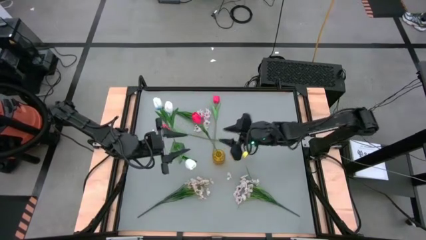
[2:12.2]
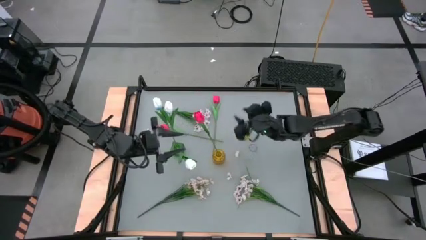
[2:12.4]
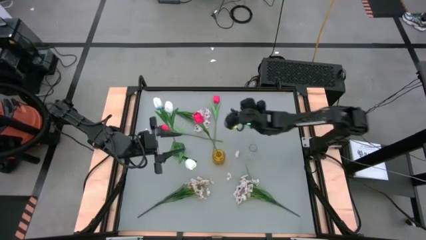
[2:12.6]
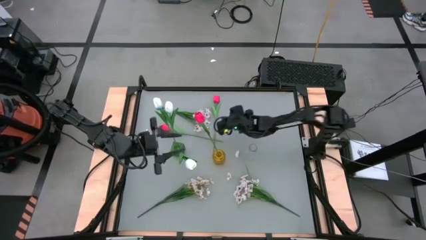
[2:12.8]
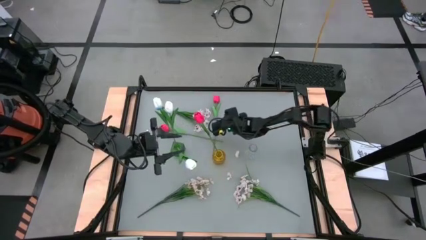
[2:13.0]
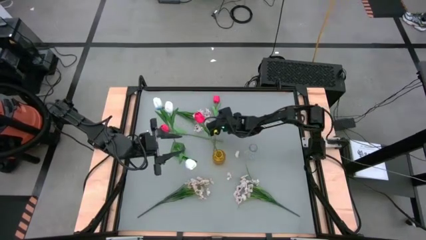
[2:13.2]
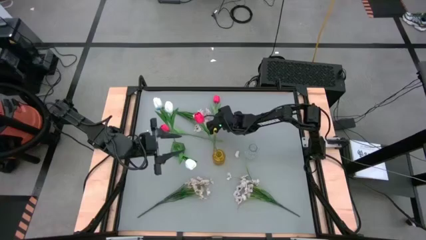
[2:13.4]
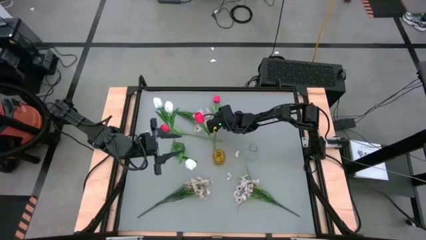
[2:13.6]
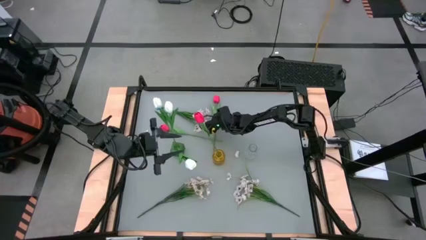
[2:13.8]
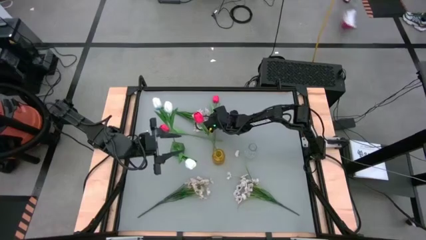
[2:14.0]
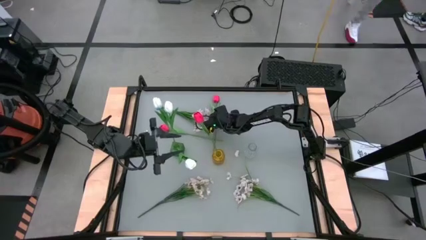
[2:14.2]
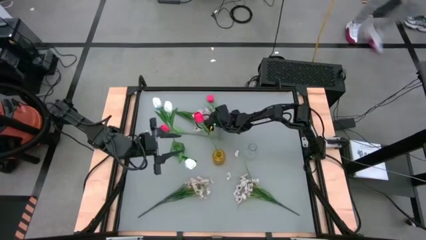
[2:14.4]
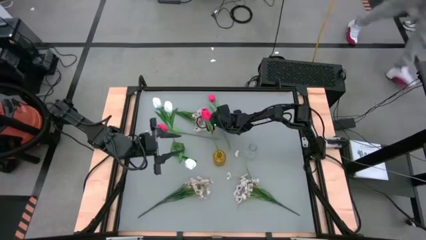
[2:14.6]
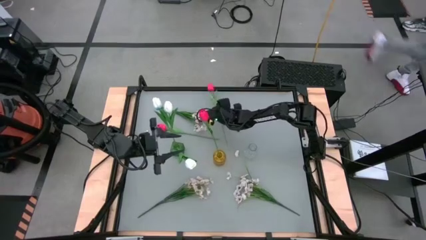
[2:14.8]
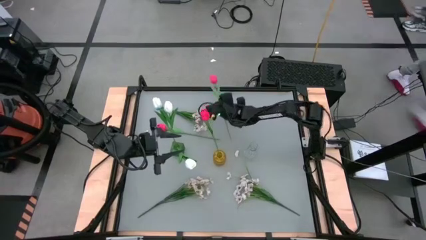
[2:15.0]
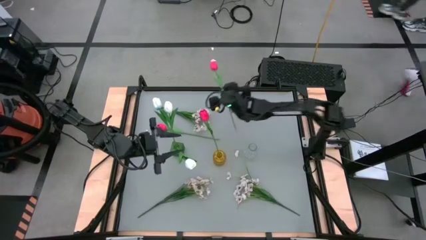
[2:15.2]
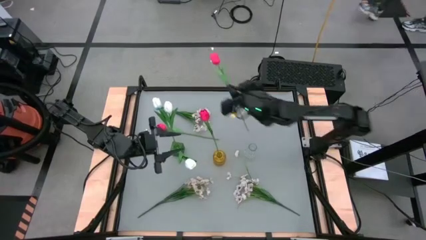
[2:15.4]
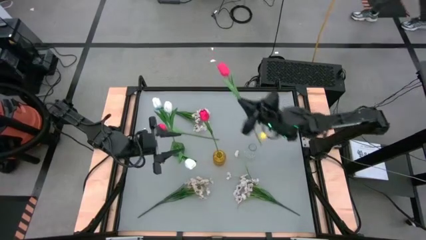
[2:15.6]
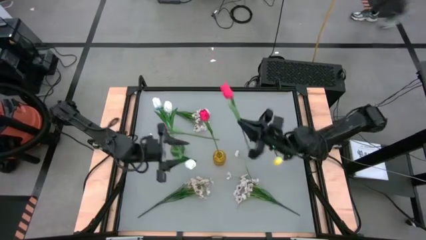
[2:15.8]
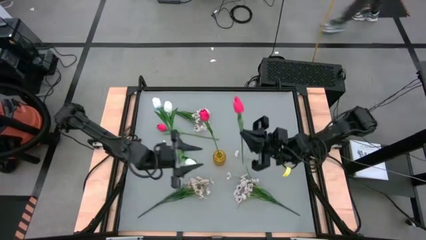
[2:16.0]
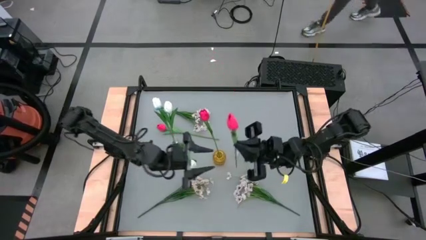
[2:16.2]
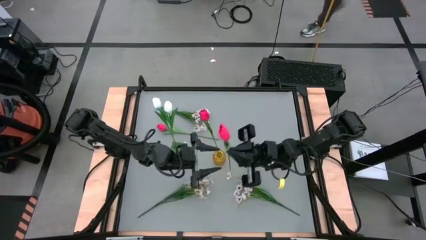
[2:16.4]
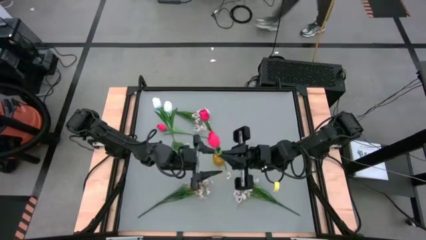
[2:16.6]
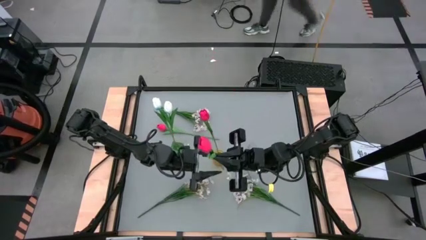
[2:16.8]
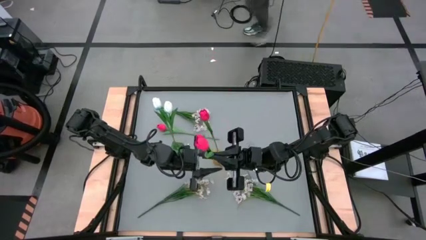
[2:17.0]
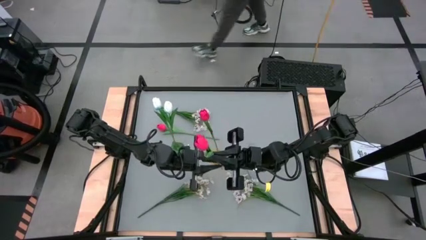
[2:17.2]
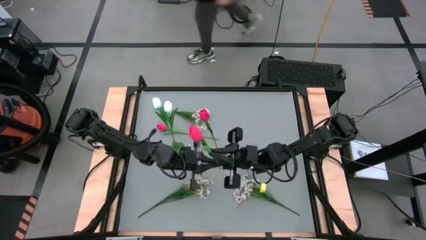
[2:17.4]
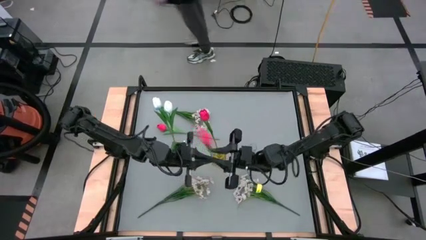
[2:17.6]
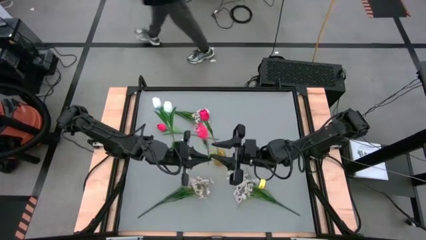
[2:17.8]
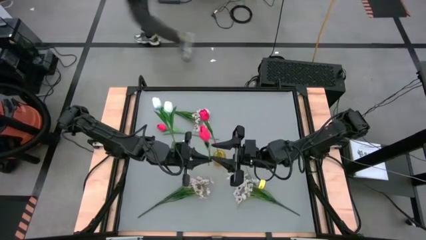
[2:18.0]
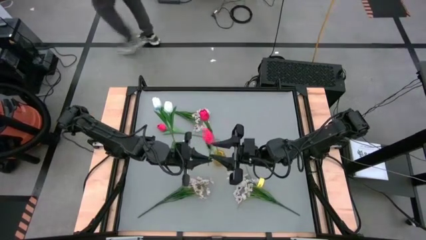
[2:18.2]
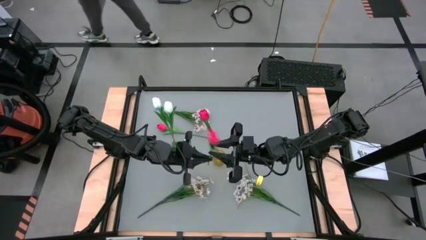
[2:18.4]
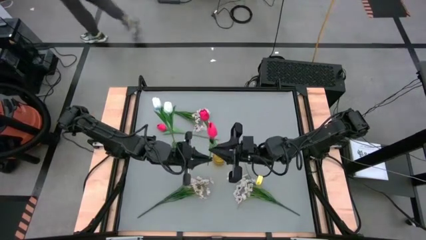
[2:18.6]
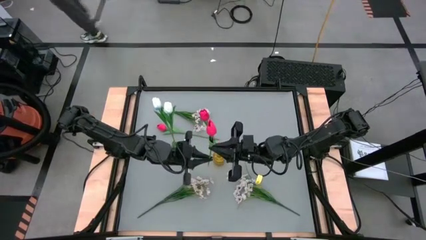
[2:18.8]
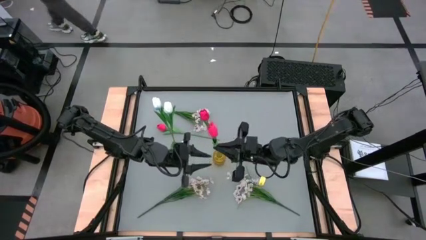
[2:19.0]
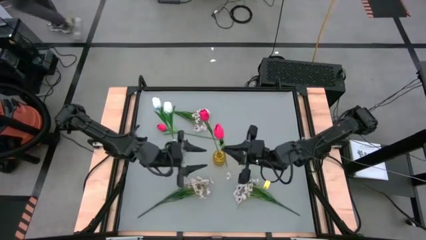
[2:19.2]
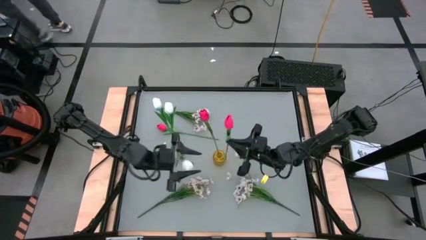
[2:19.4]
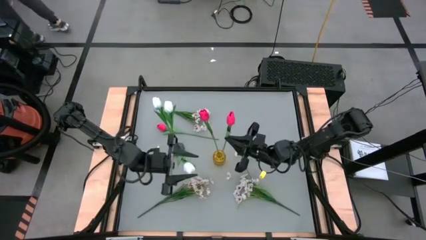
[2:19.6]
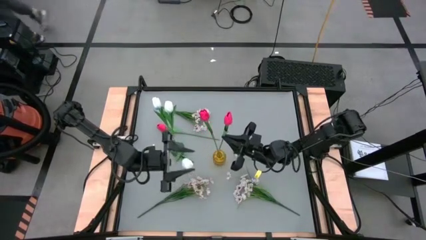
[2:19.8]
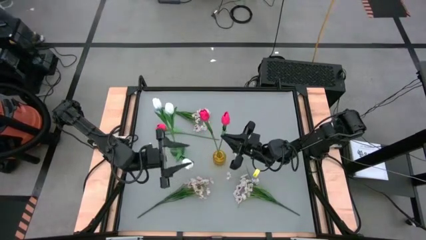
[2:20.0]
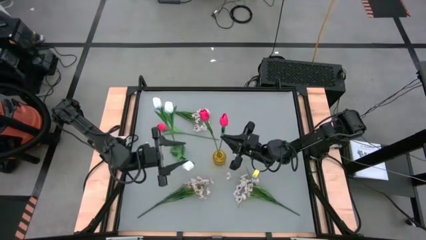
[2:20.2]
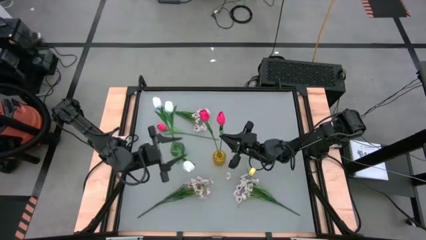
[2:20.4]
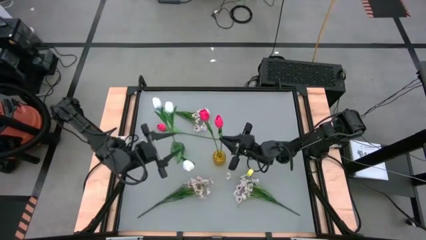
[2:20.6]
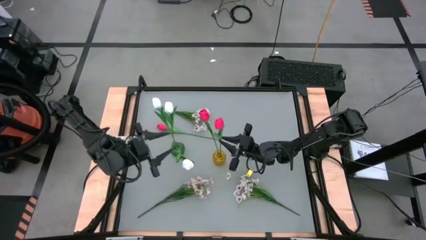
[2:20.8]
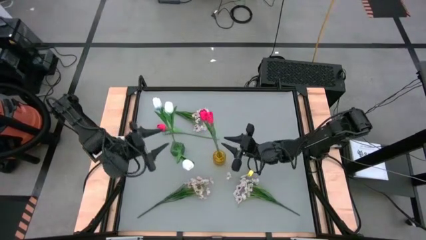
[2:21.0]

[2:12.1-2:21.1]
Task: Sort flowers into vase by color
Put the right pink flower into the yellow flower vase

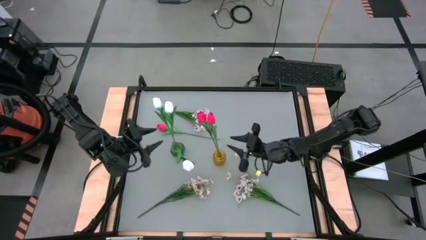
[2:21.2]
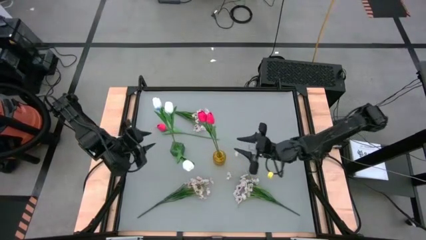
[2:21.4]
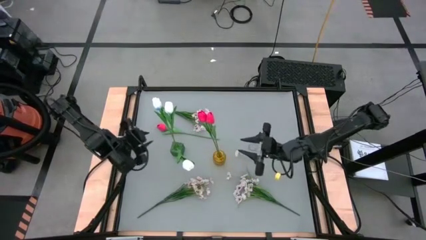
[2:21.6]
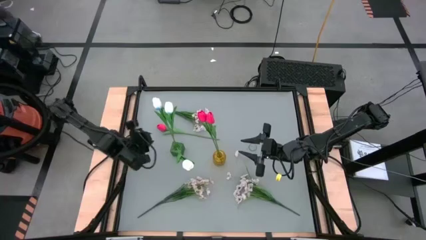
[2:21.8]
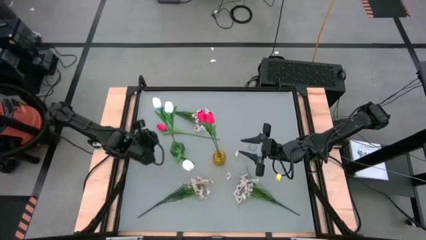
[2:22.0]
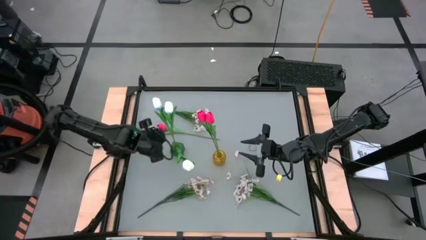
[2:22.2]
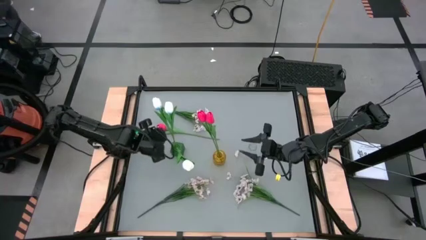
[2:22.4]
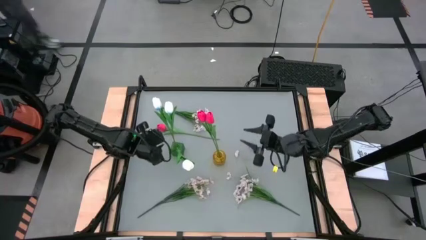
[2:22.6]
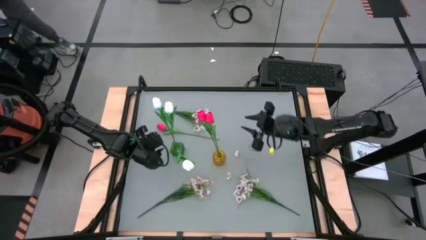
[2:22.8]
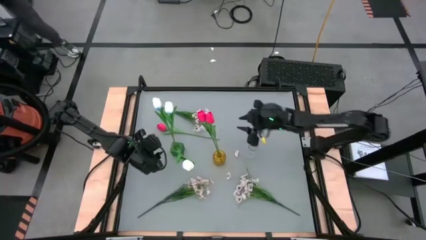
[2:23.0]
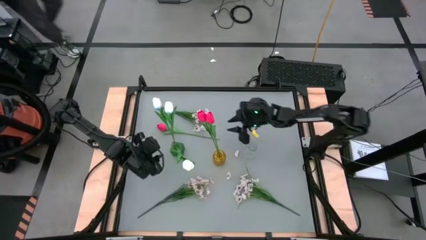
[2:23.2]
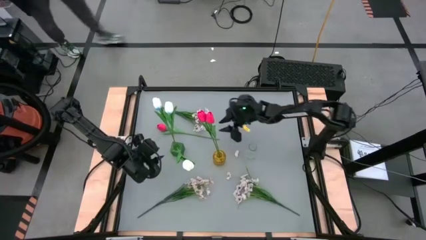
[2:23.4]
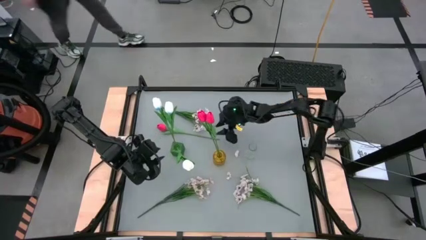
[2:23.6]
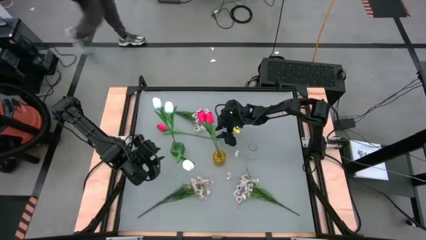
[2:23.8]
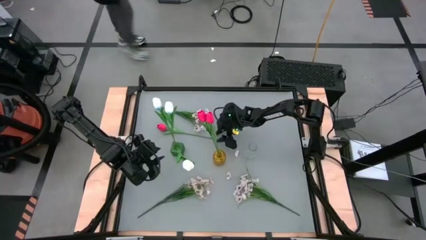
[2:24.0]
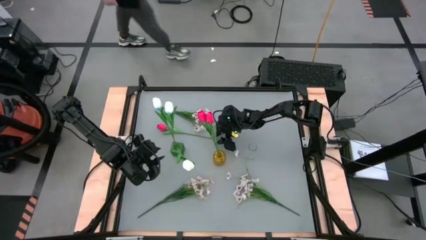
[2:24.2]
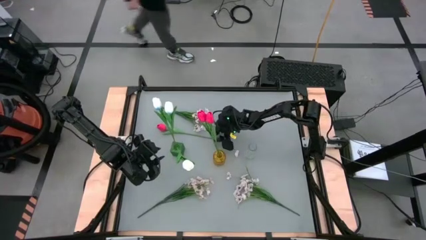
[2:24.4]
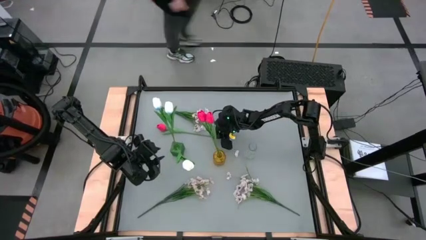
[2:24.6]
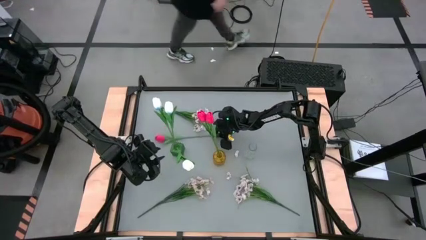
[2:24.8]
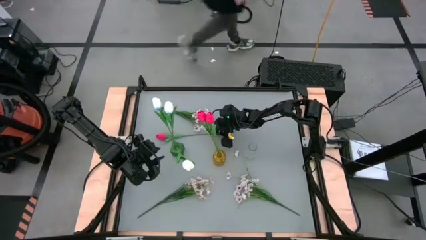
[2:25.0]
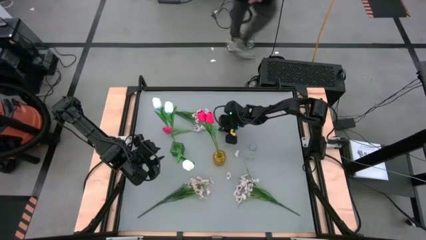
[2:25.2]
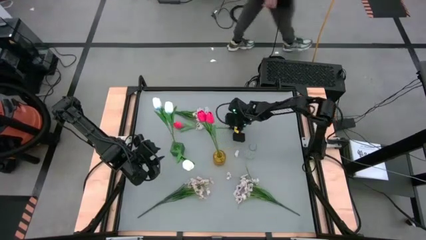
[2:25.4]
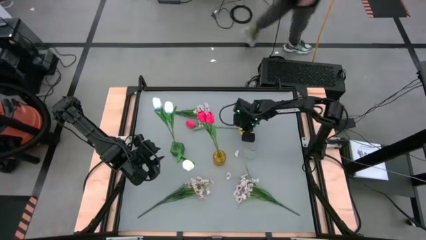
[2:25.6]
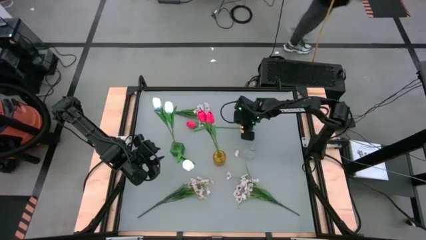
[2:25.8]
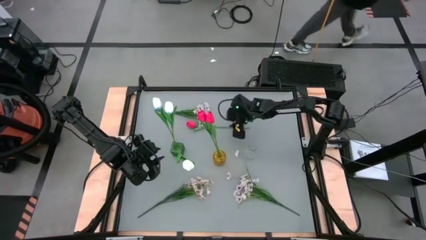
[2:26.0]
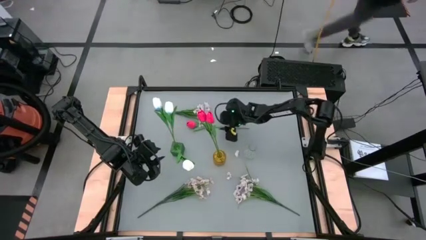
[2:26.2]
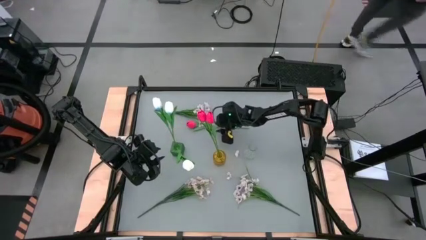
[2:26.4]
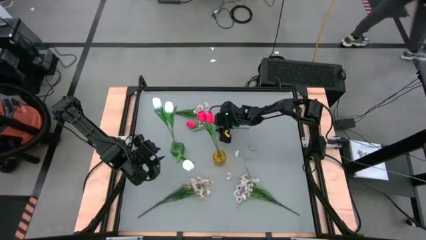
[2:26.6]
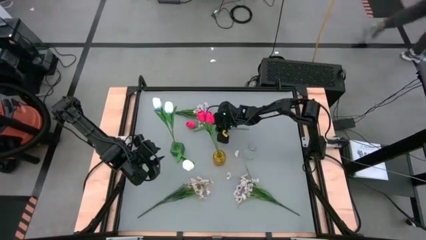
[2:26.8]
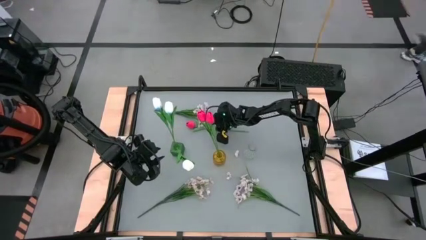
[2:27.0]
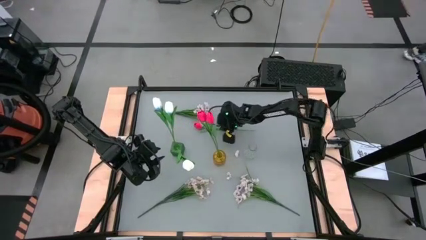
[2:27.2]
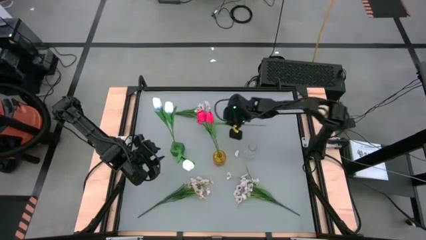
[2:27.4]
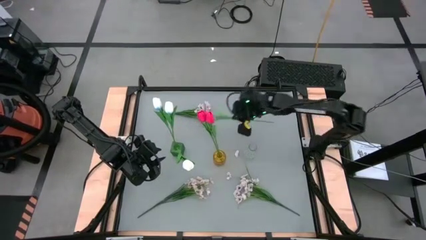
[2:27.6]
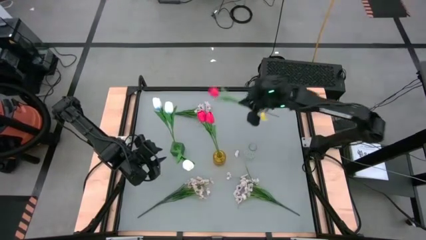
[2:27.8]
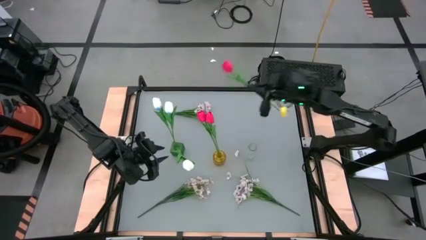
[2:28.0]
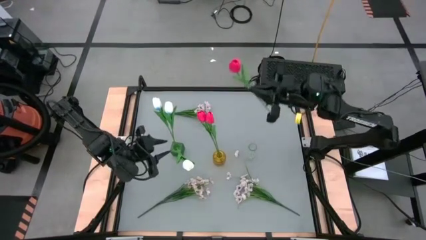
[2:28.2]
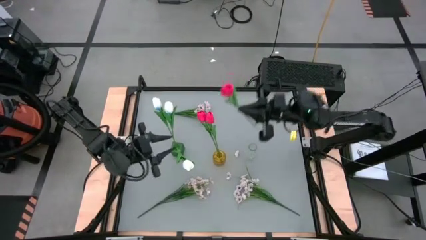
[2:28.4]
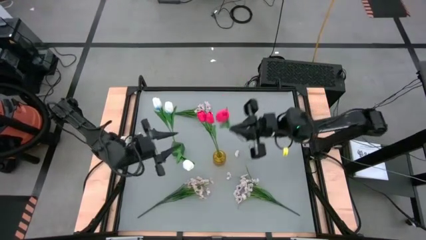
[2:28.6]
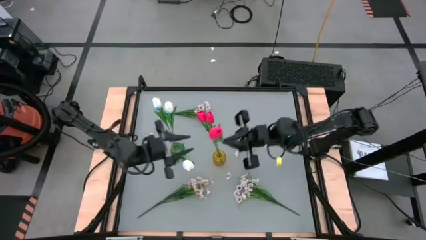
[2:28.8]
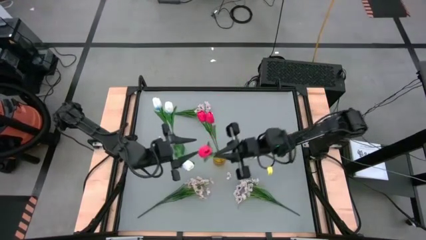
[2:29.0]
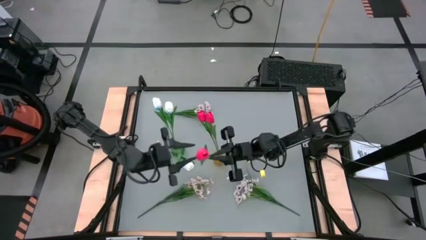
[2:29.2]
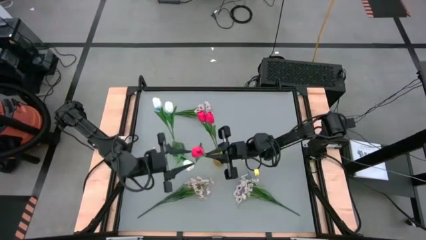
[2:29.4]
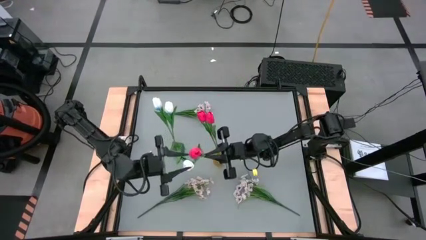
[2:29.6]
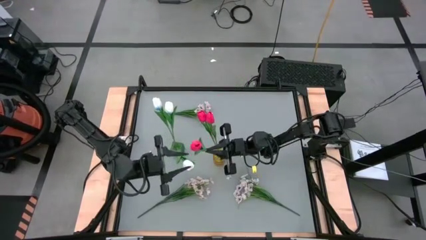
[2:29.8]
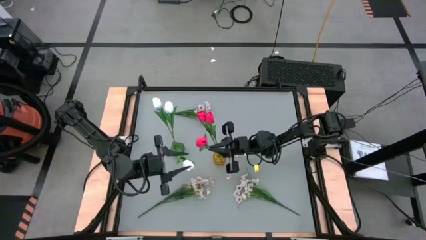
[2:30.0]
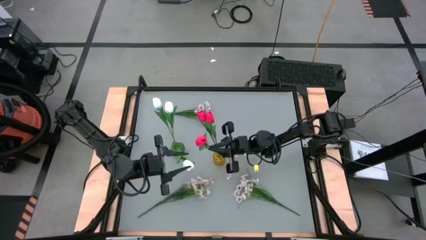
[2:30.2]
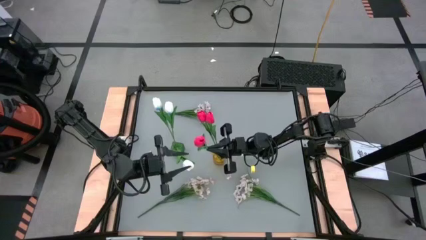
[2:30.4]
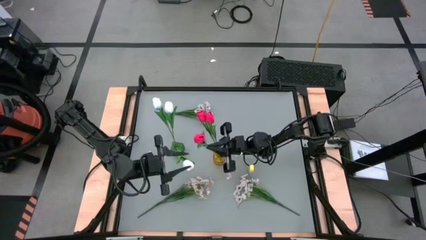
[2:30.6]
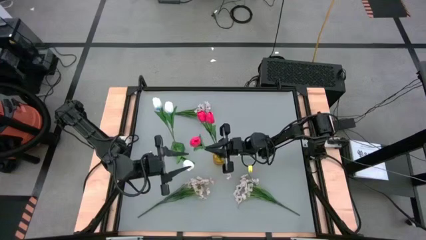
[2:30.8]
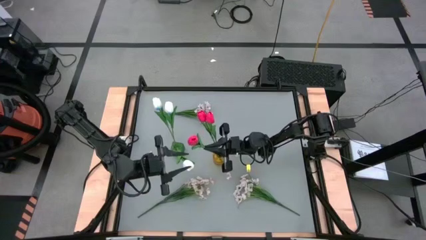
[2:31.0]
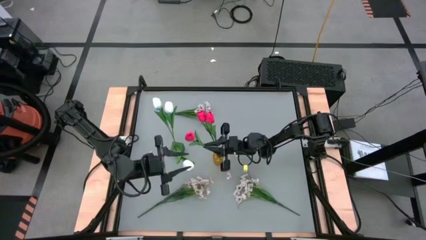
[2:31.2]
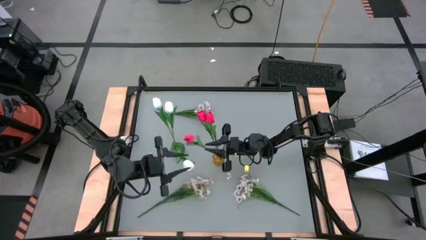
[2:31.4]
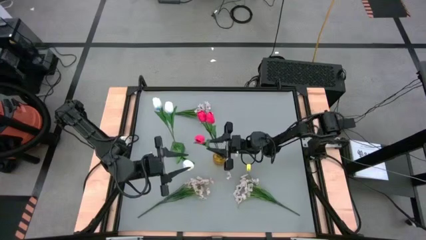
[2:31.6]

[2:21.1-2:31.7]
Put the pink flower into the yellow flower vase
